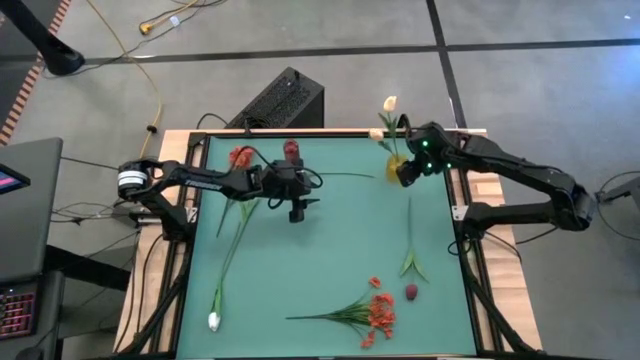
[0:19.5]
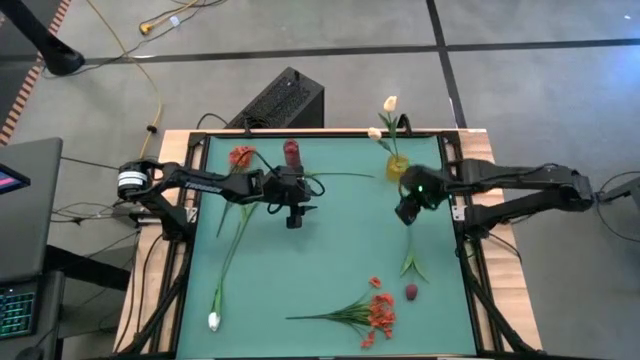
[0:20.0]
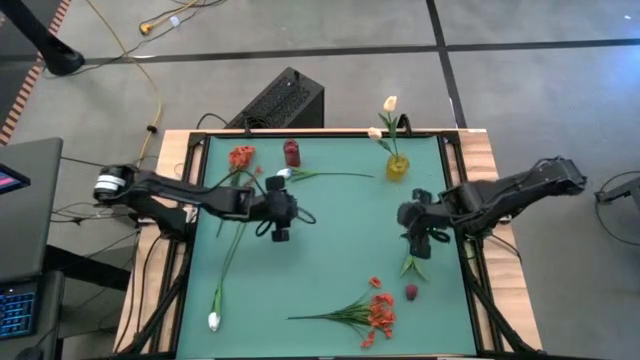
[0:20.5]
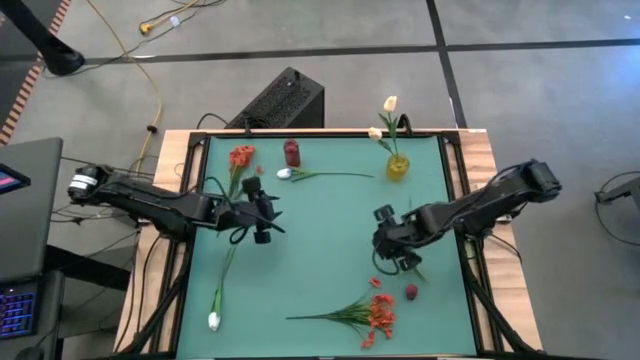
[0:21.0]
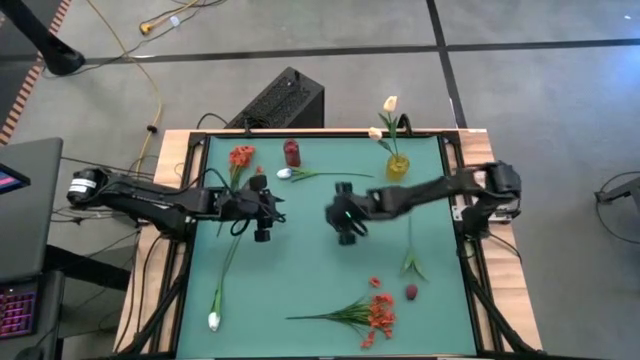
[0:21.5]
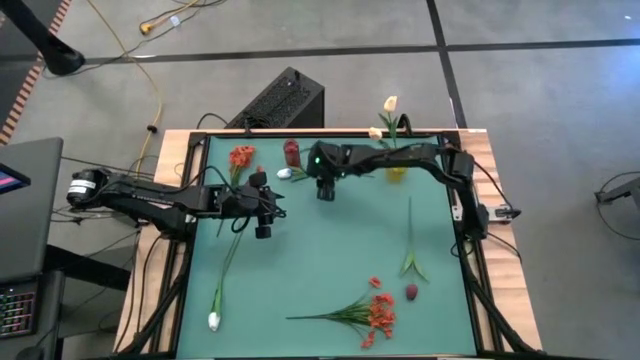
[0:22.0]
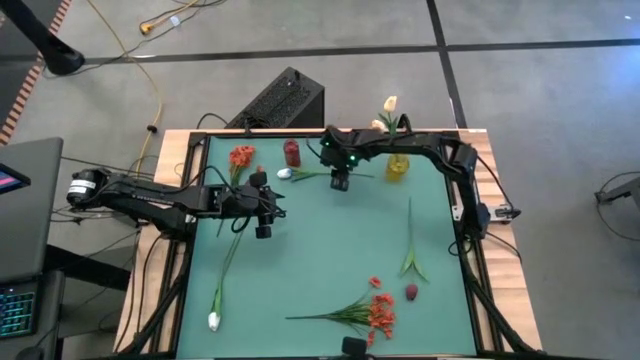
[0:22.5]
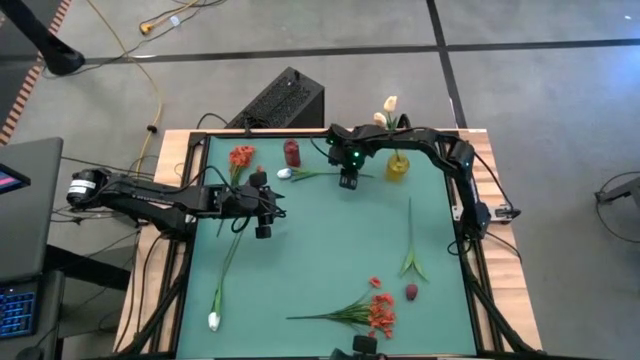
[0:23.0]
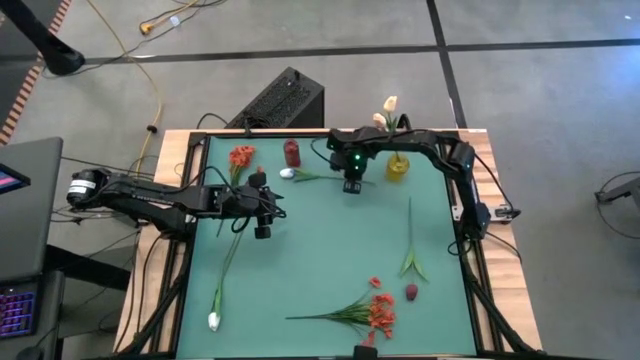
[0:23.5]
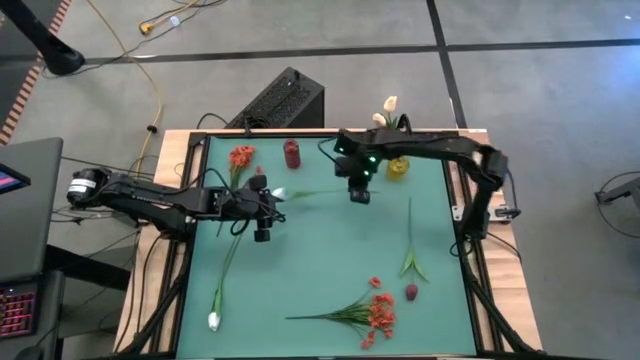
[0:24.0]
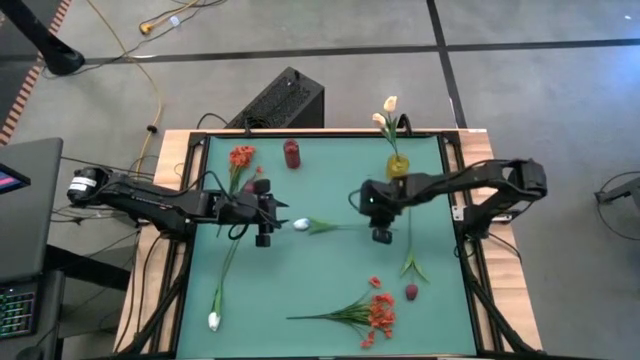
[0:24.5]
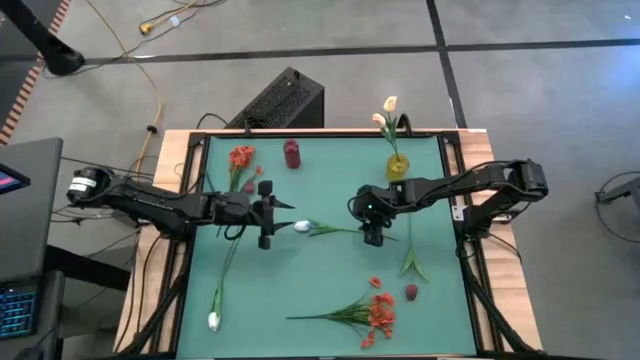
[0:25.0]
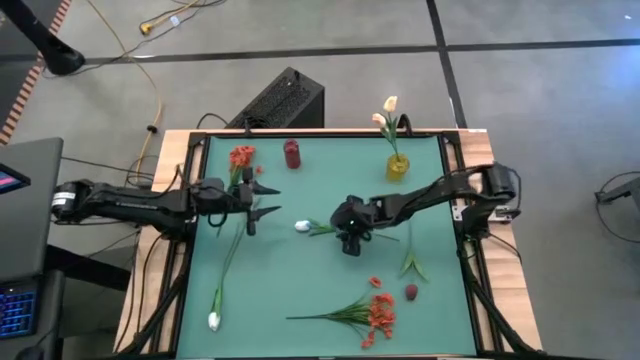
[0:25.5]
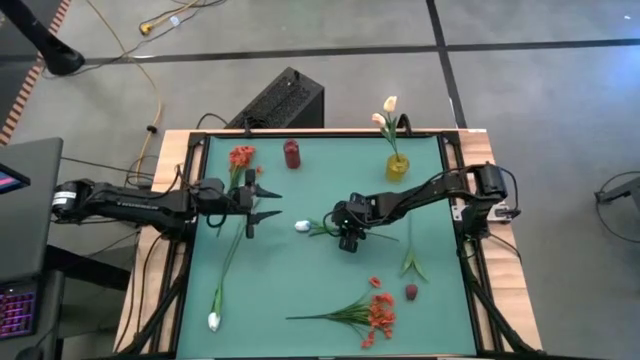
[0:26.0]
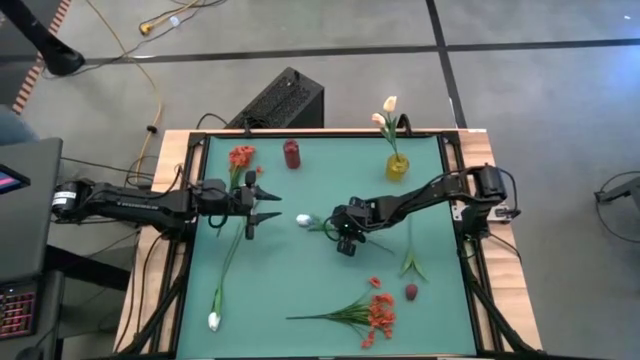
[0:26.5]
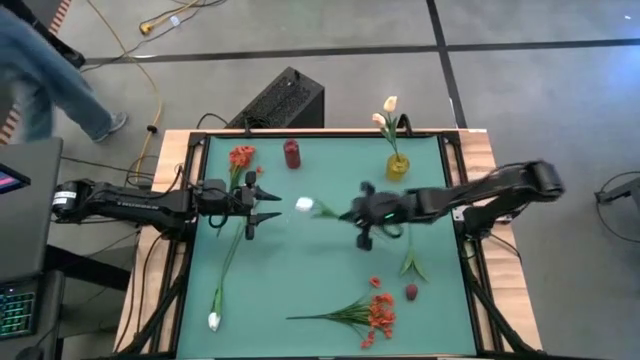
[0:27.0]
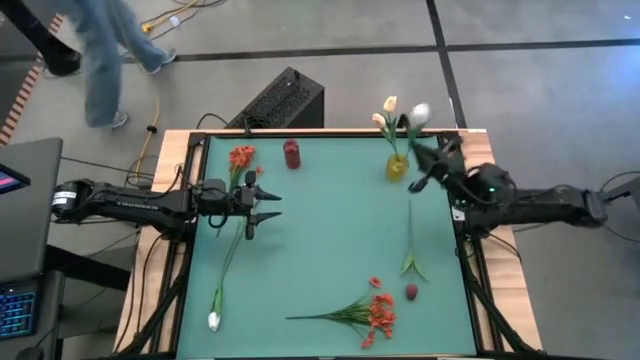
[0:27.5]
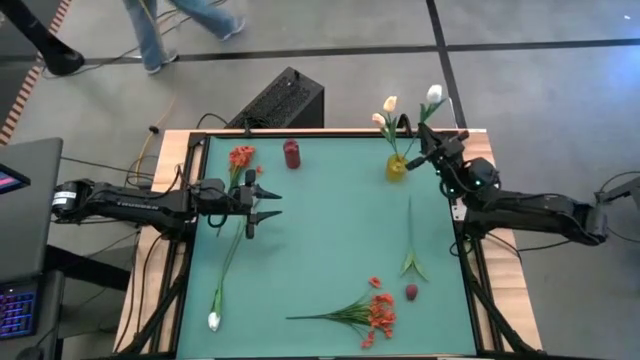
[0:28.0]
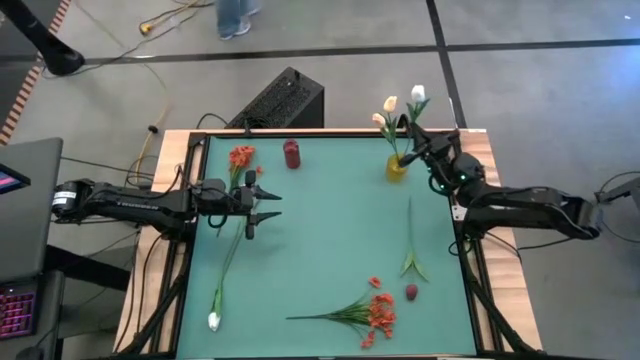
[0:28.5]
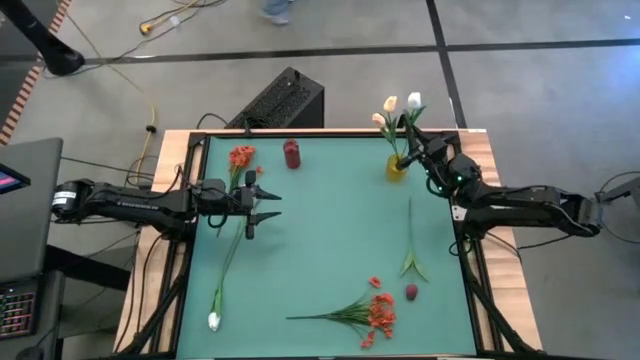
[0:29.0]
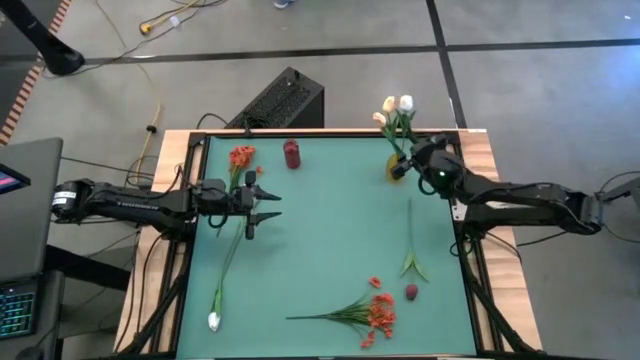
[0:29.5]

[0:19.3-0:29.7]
Task: Sort flowers into vase by color
Put the top white flower into the yellow vase

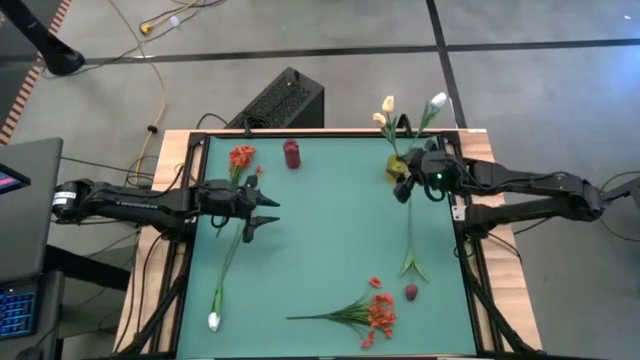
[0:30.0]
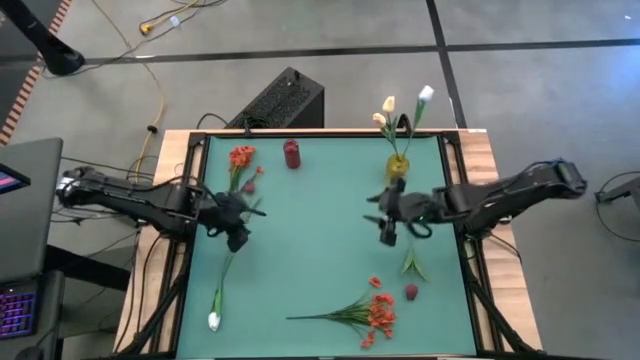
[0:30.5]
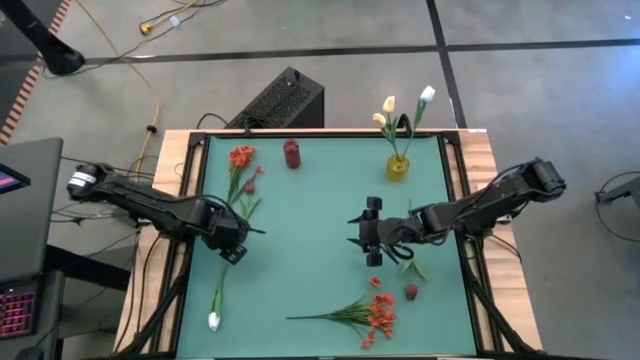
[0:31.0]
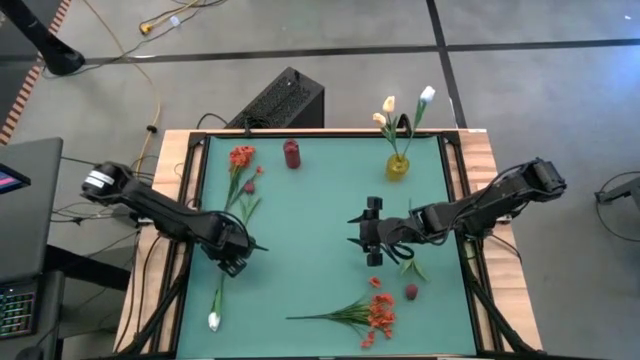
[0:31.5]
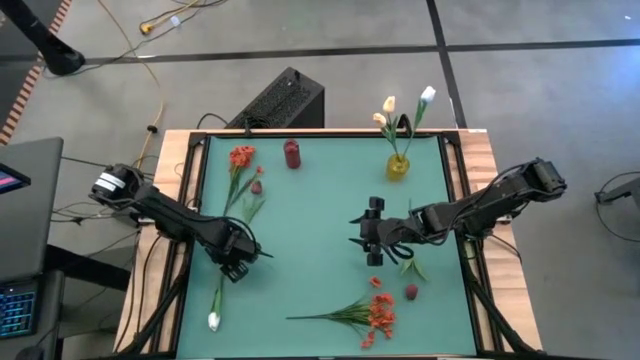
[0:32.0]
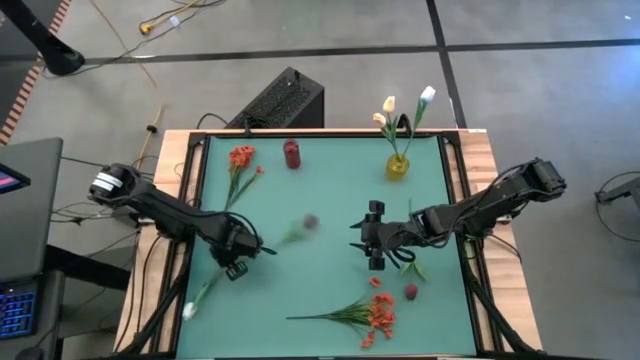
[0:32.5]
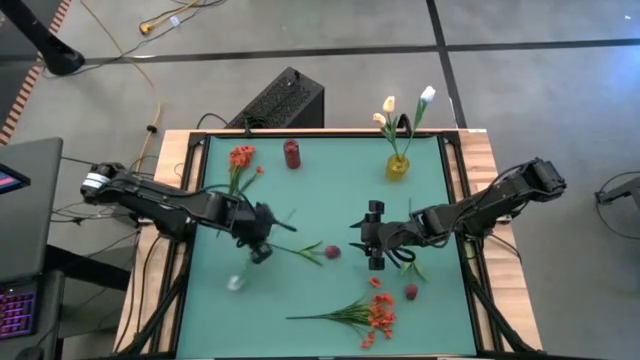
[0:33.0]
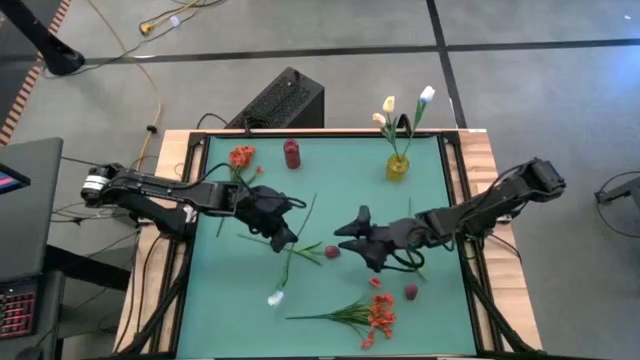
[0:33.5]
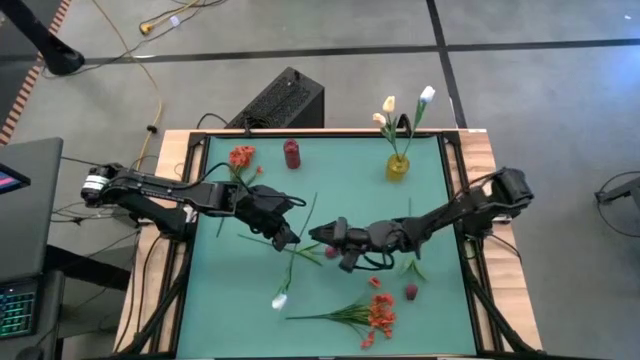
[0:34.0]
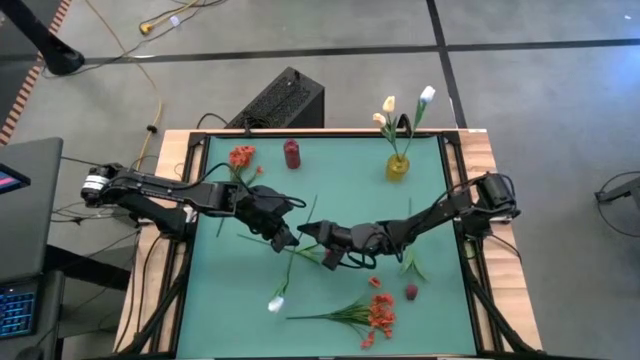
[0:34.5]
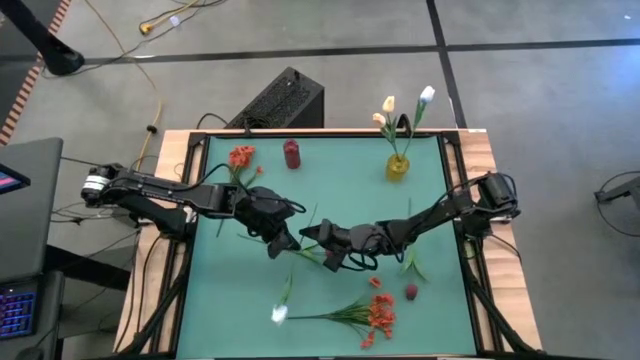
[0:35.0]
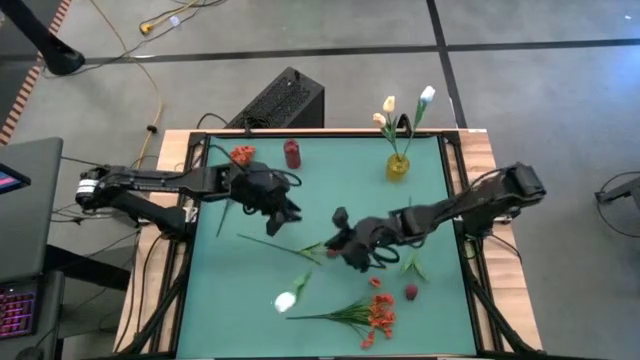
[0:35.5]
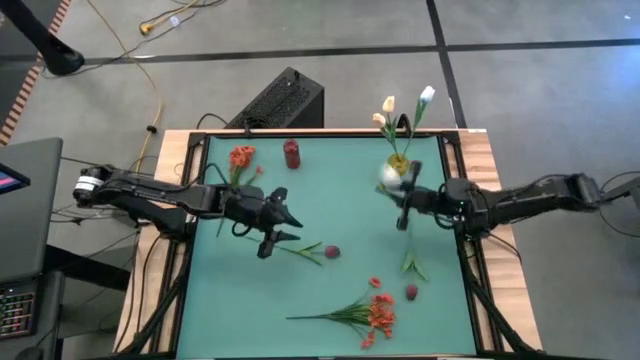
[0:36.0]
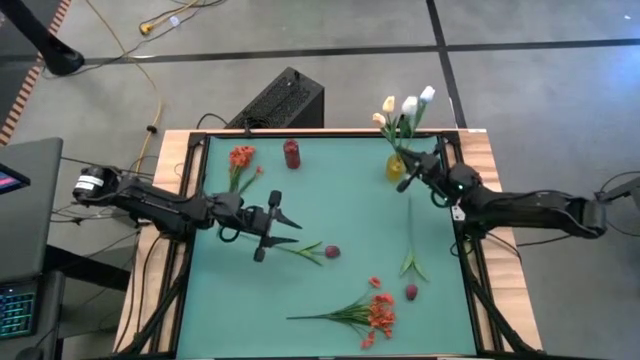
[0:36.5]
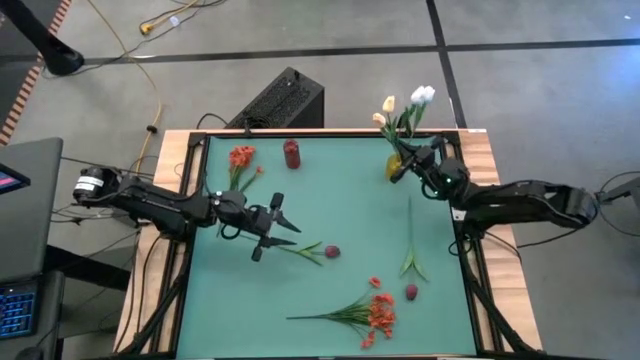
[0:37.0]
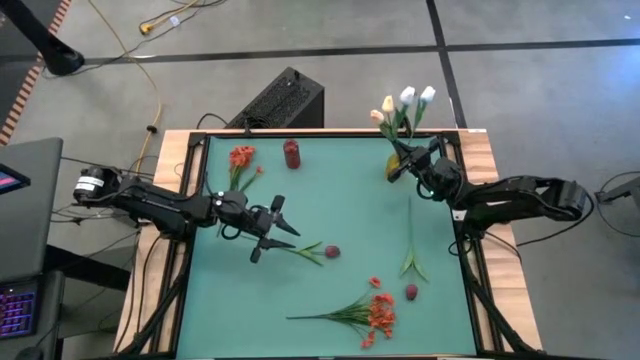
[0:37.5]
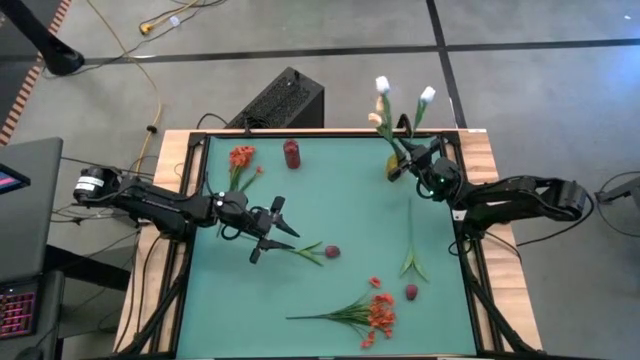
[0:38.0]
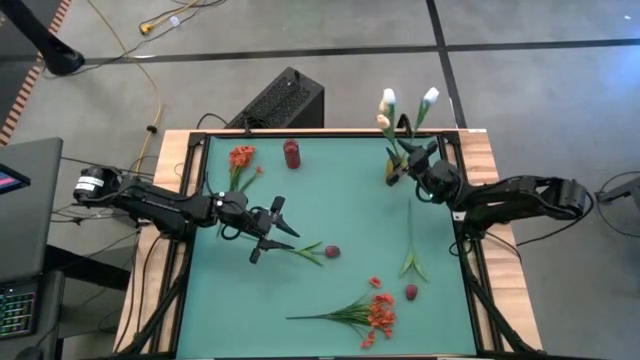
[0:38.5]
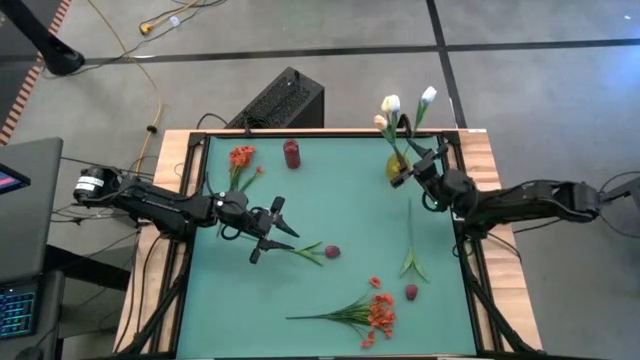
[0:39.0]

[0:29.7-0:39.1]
Put the white flower into the yellow vase

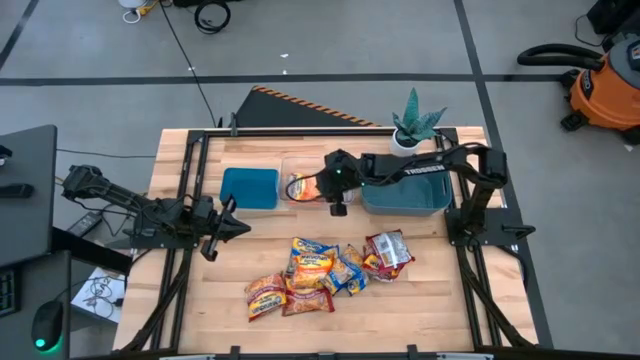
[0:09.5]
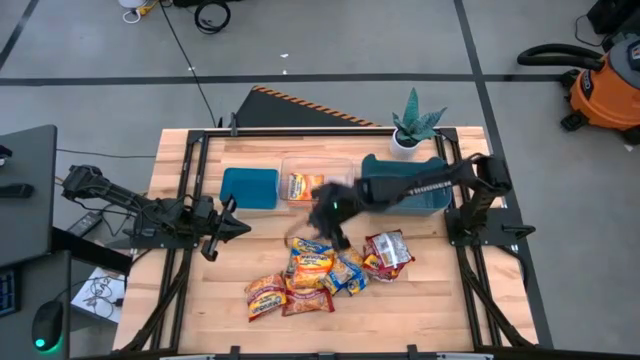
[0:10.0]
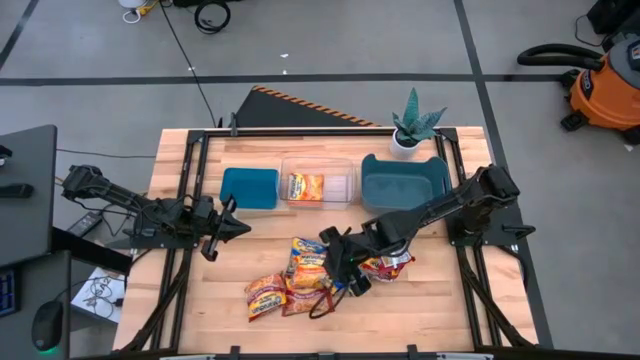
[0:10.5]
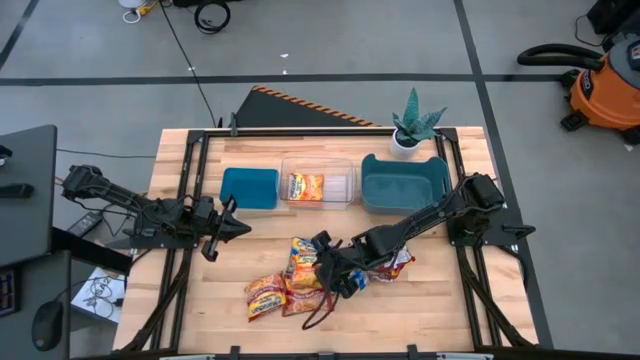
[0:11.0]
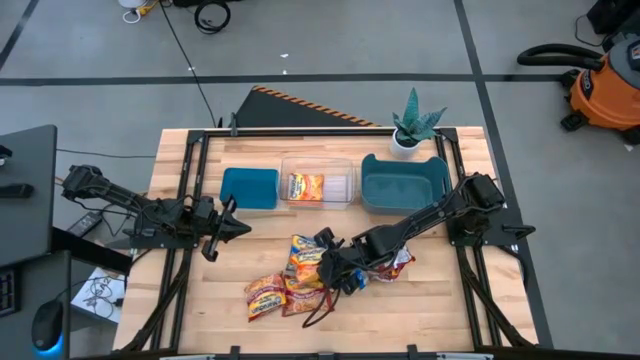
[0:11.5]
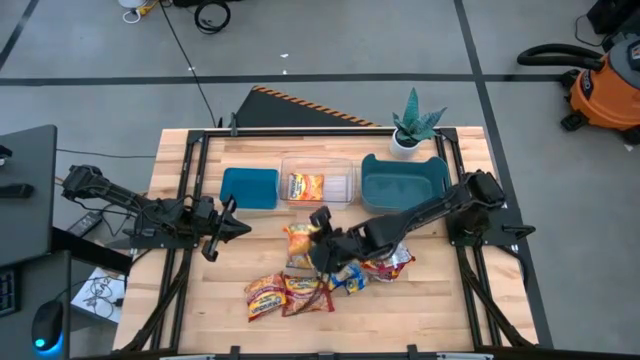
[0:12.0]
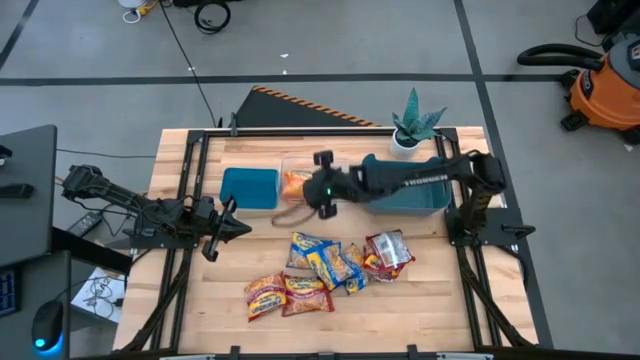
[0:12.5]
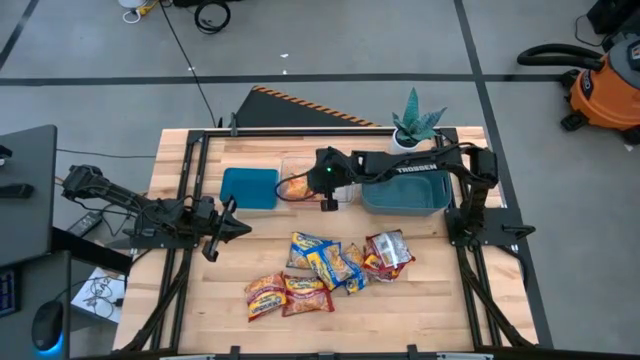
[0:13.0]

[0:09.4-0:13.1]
Task: Sort Maruchan noodles
Put the orange noodle pack into the transparent bin
